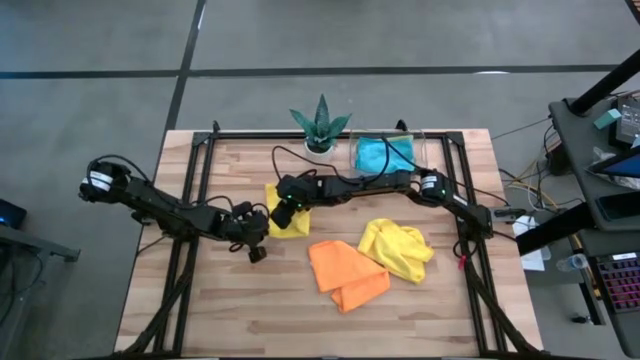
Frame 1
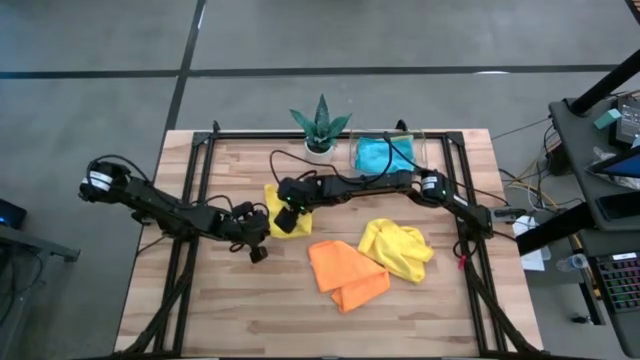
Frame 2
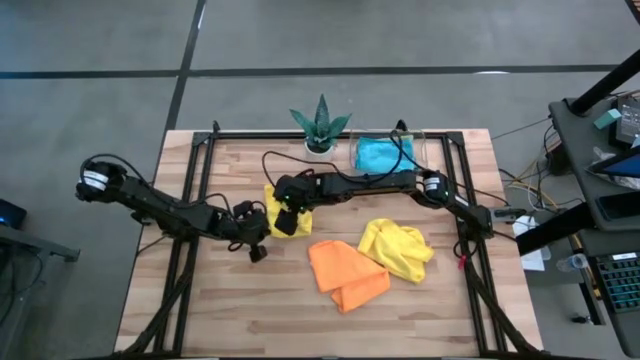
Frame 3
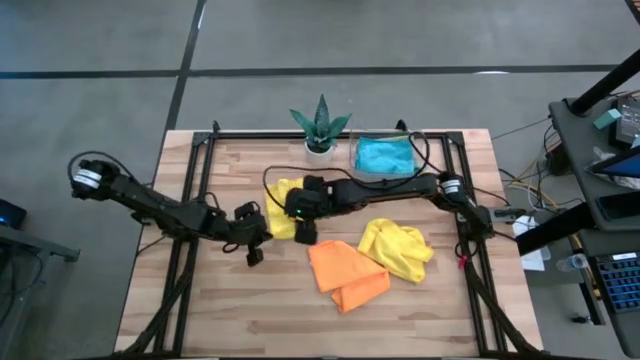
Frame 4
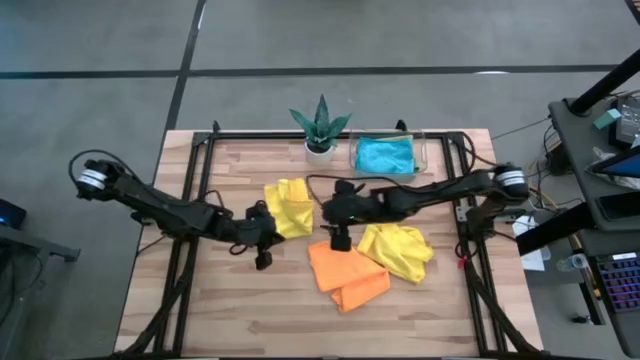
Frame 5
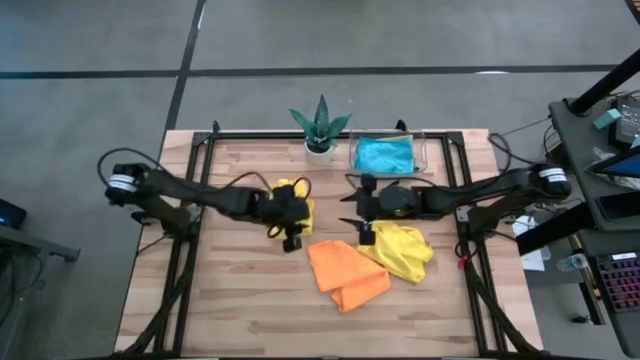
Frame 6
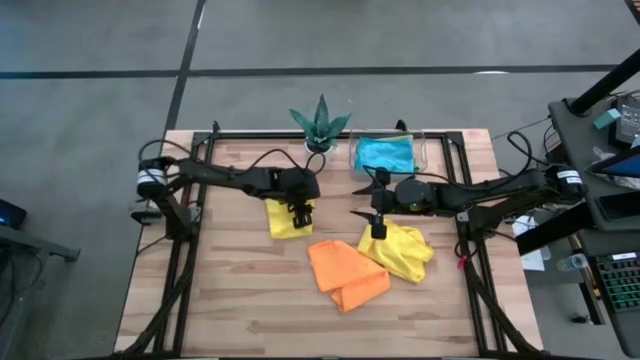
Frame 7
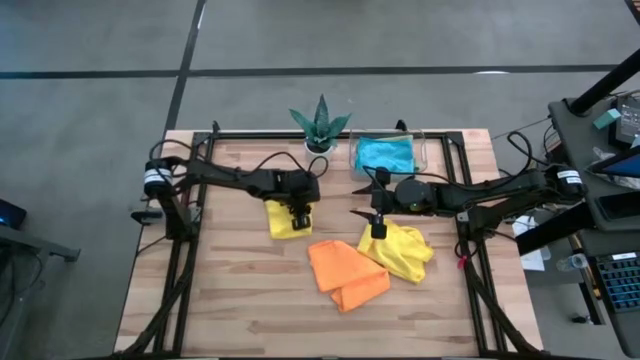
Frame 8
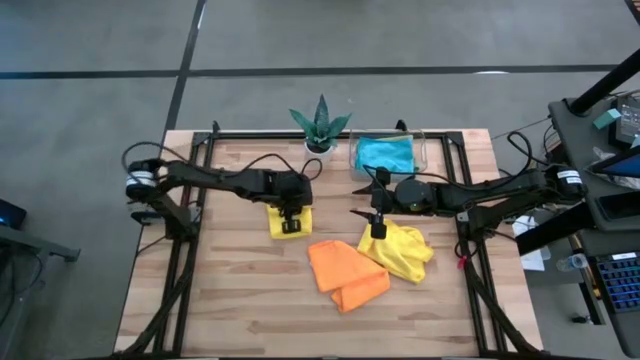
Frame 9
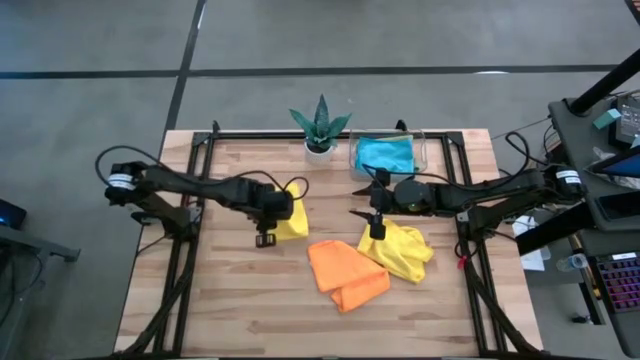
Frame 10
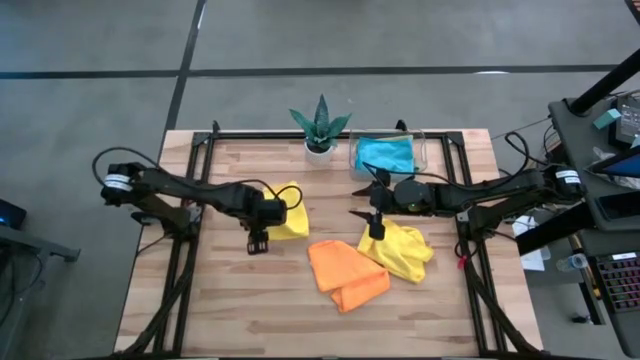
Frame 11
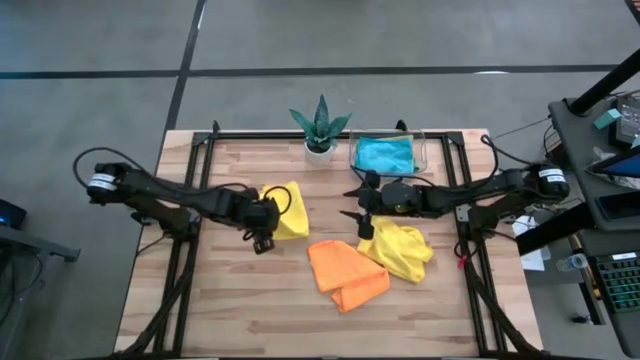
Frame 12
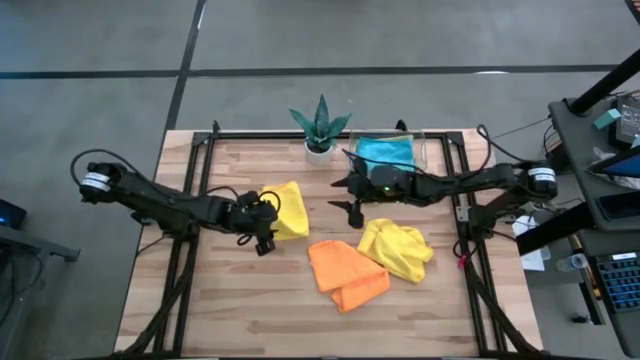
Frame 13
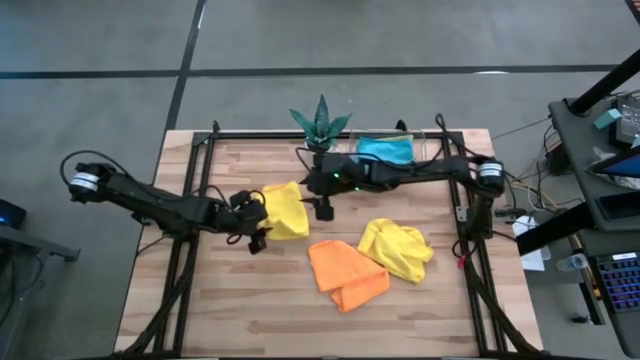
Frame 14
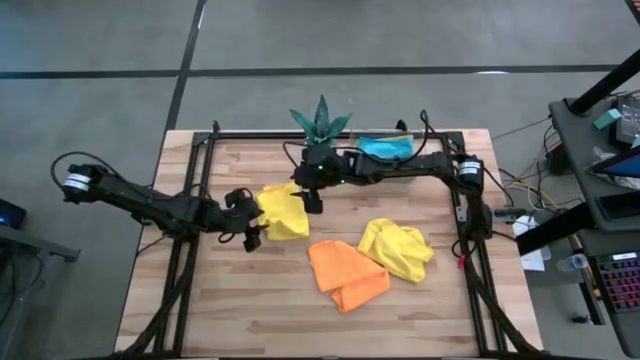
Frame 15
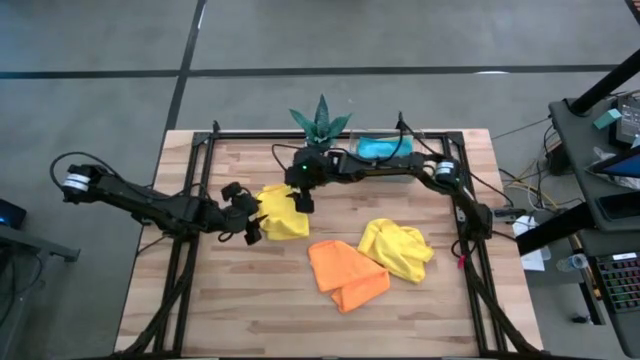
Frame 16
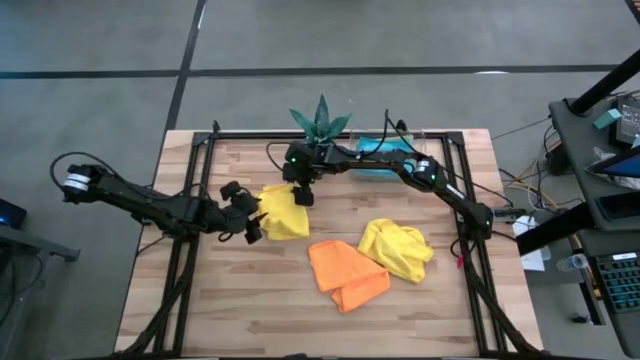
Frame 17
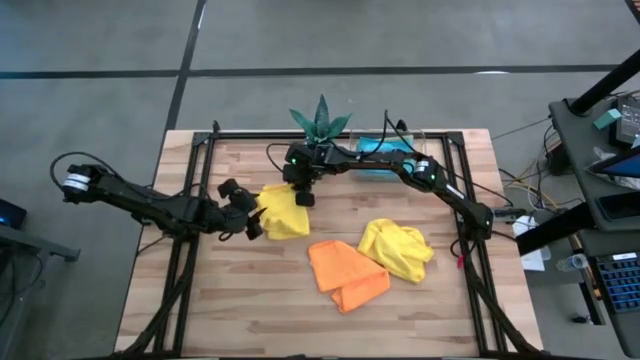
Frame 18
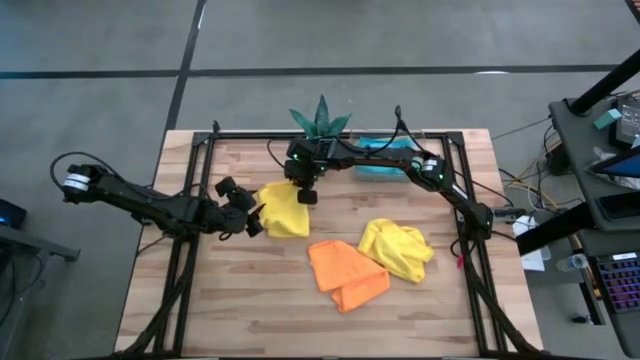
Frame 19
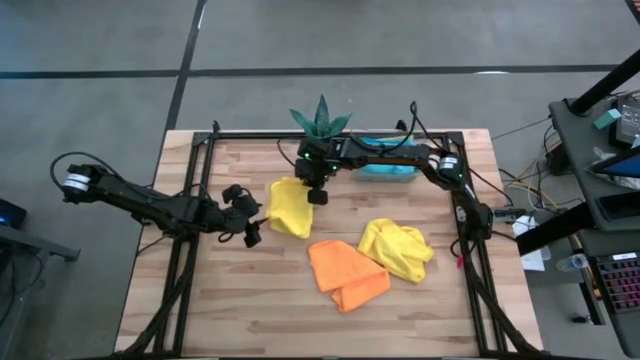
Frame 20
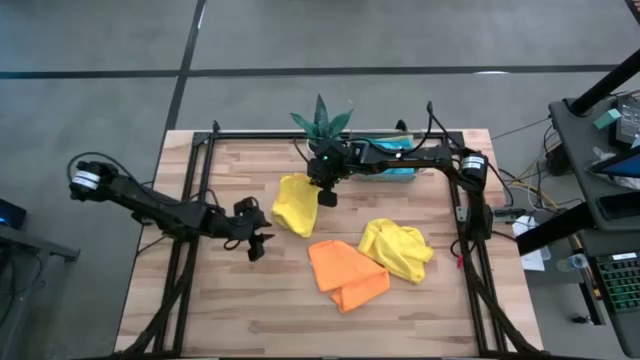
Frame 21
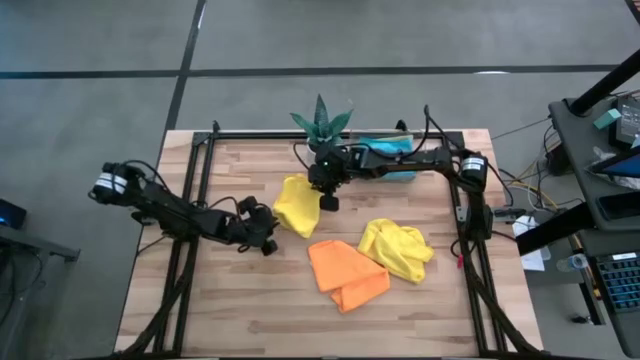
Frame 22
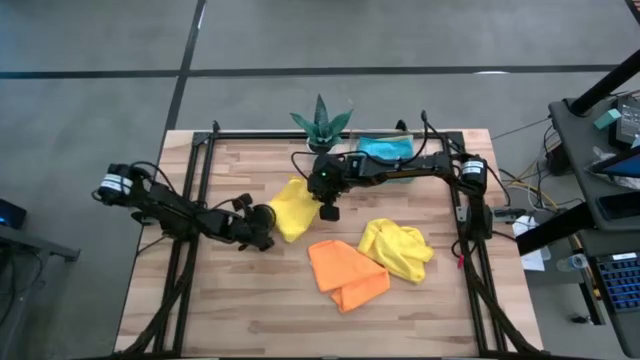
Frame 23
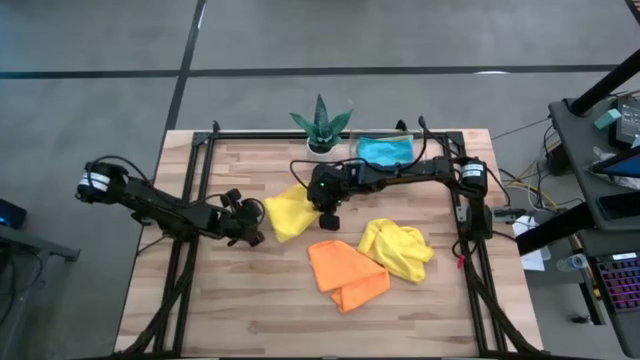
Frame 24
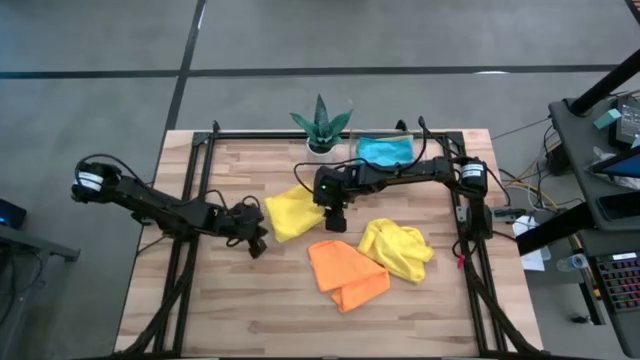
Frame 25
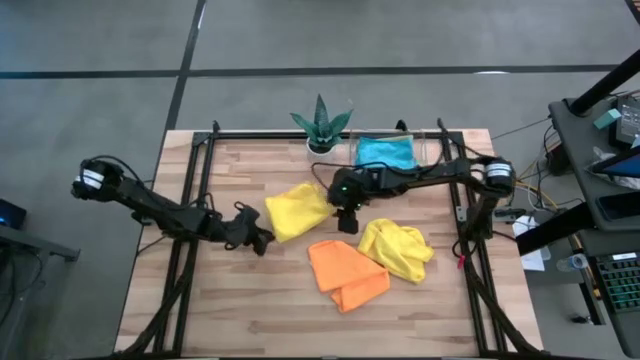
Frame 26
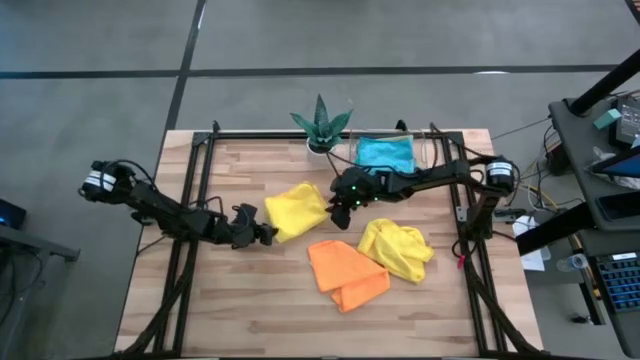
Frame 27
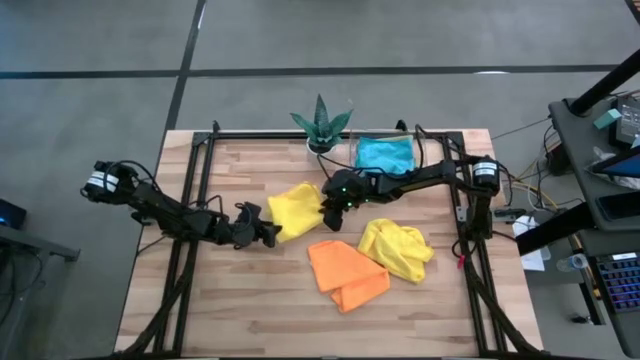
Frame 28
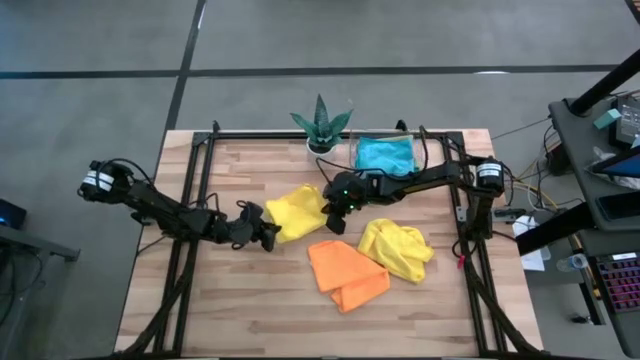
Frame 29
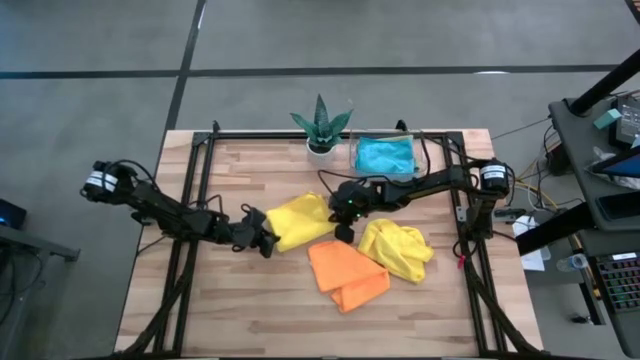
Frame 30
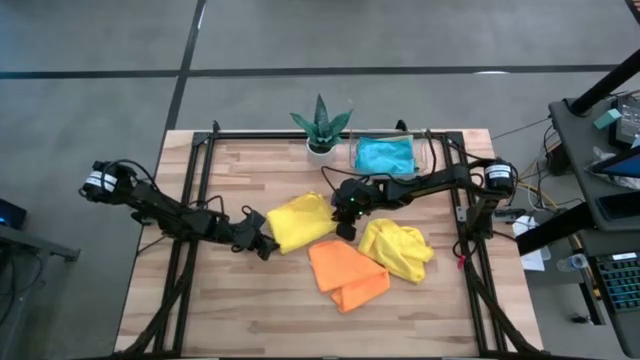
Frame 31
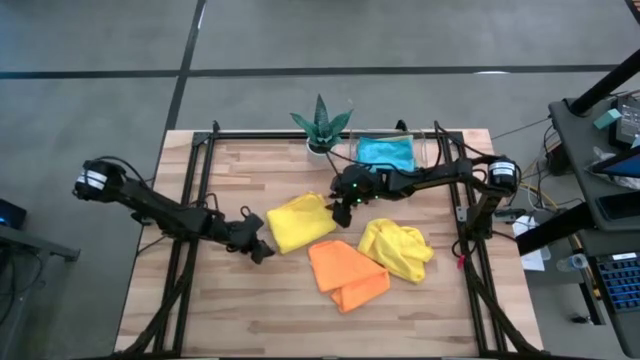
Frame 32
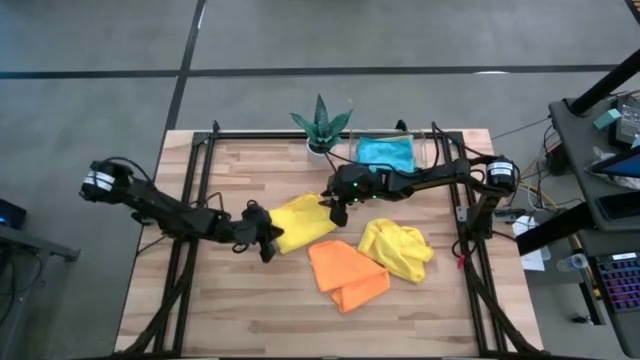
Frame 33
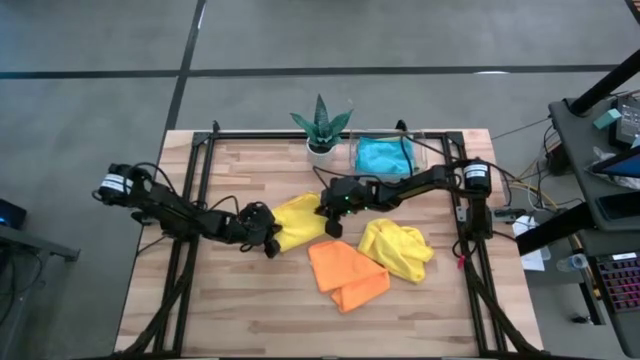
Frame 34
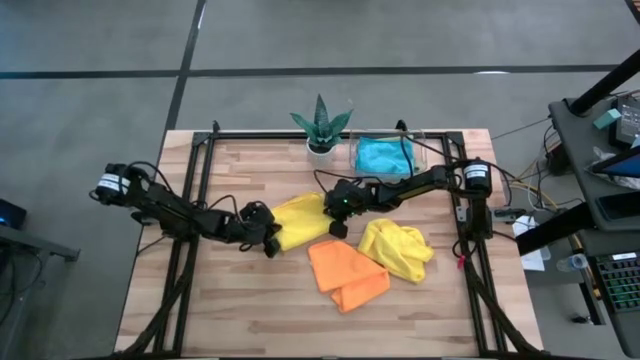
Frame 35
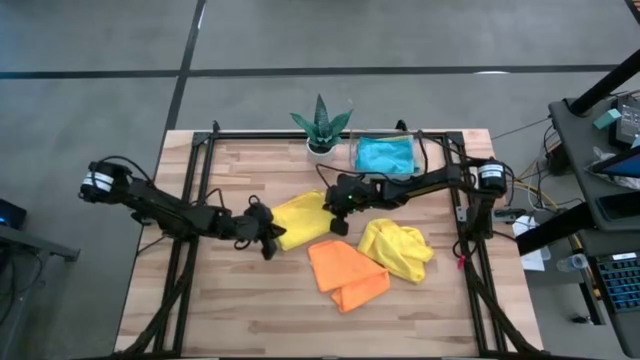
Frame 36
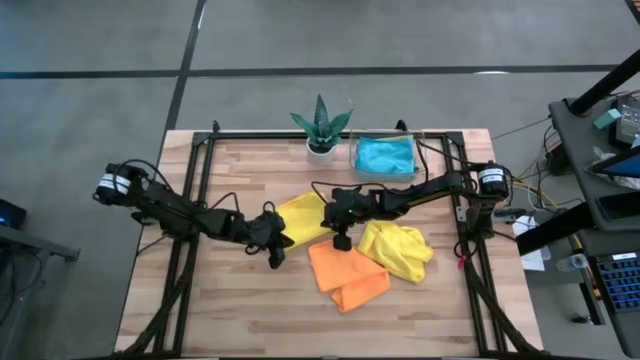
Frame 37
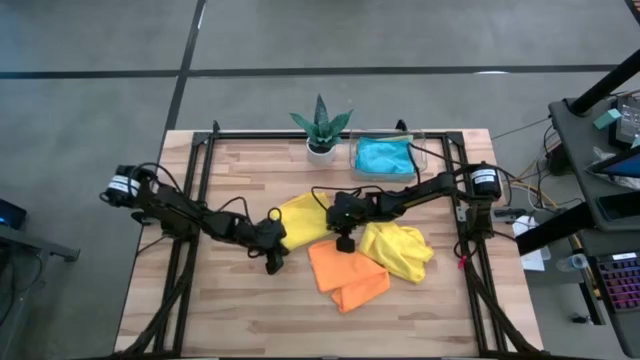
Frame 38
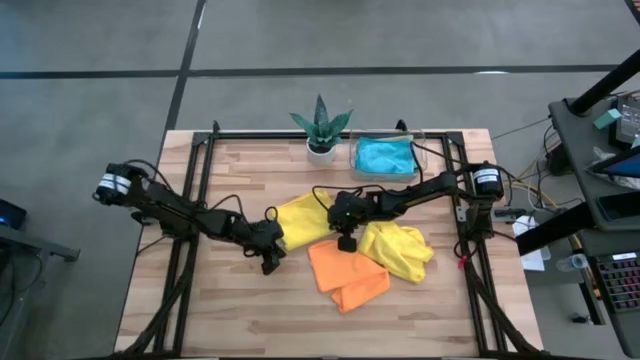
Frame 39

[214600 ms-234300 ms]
Task: Fold microfiber towels
Fold the left yellow microfiber towel
